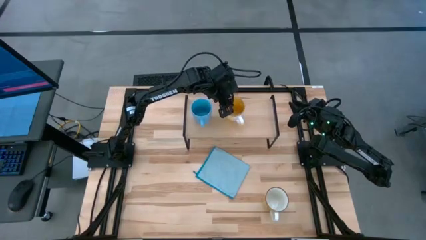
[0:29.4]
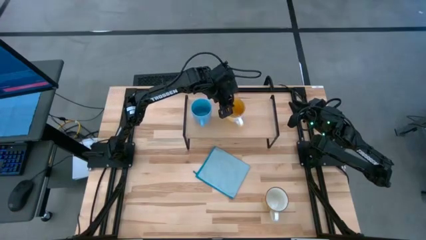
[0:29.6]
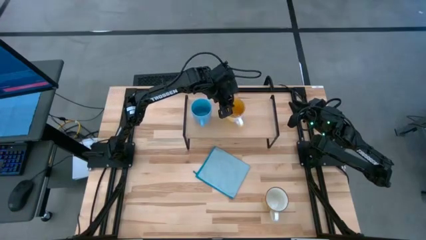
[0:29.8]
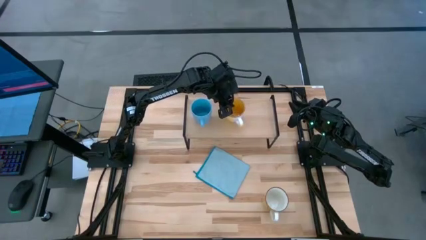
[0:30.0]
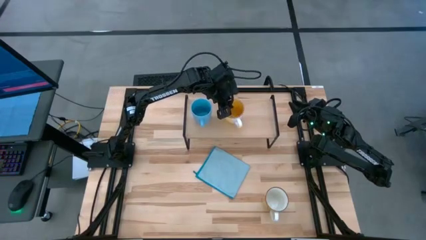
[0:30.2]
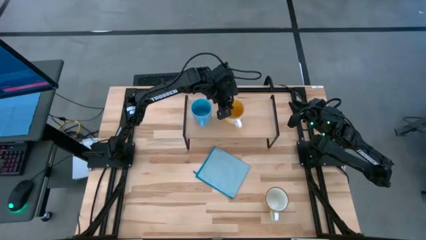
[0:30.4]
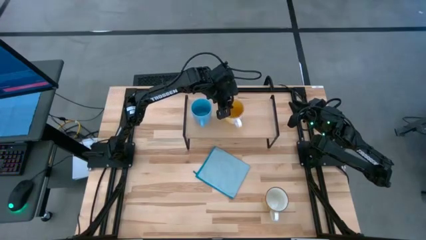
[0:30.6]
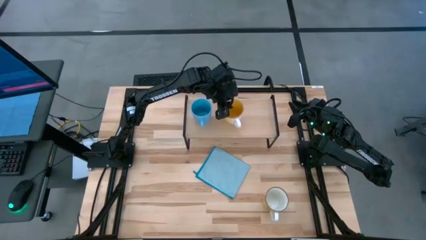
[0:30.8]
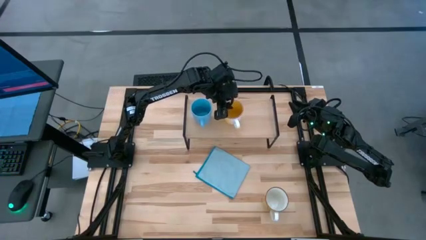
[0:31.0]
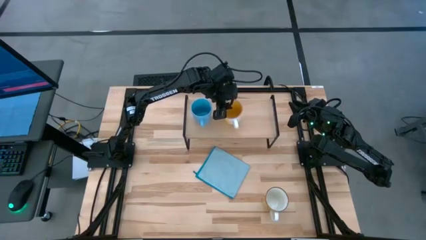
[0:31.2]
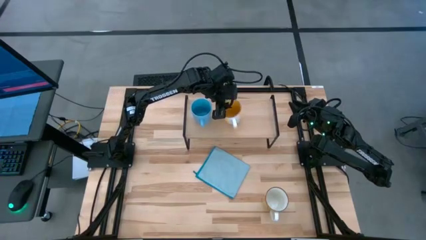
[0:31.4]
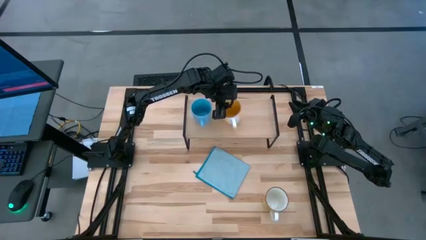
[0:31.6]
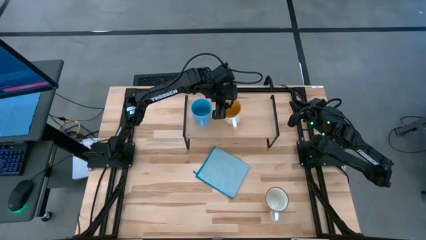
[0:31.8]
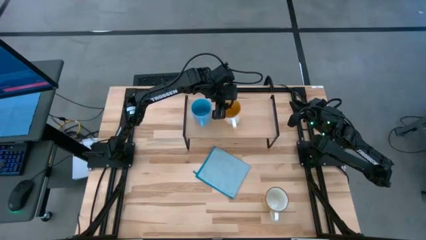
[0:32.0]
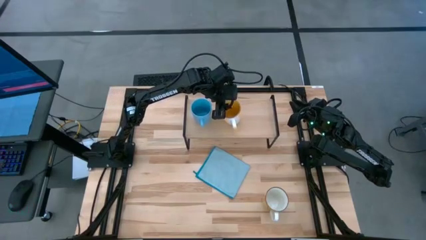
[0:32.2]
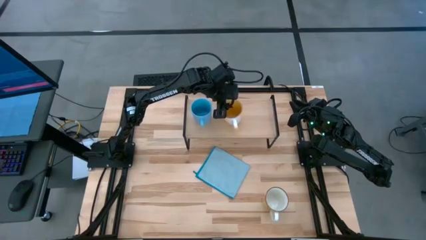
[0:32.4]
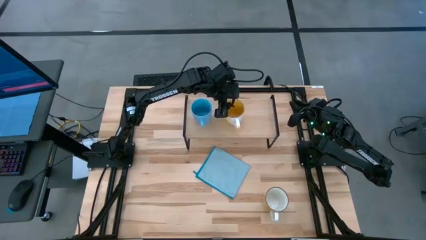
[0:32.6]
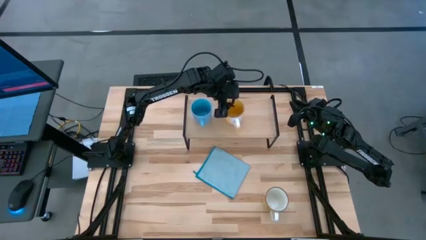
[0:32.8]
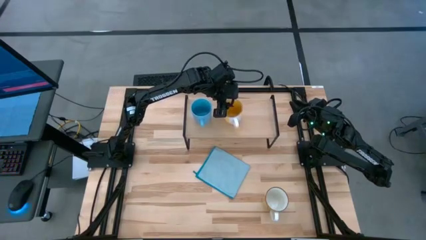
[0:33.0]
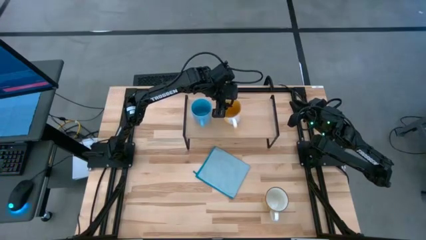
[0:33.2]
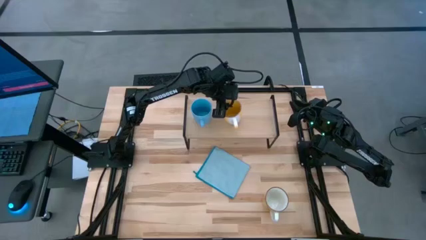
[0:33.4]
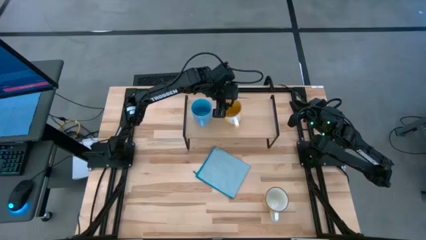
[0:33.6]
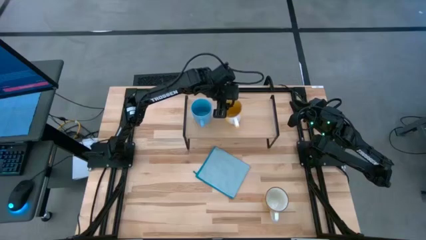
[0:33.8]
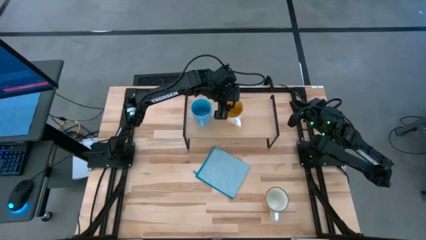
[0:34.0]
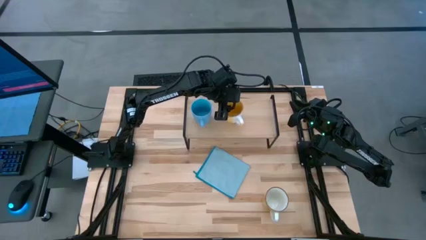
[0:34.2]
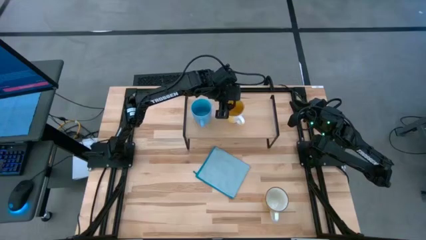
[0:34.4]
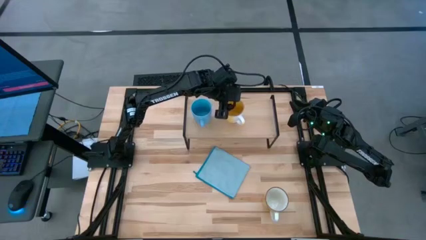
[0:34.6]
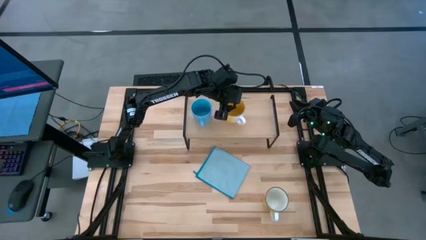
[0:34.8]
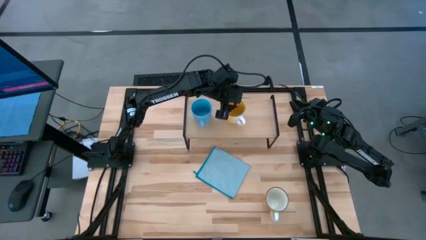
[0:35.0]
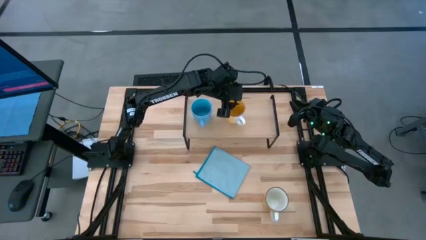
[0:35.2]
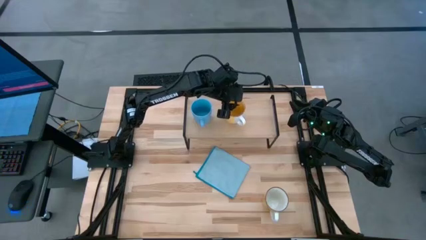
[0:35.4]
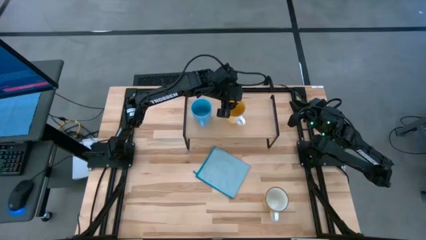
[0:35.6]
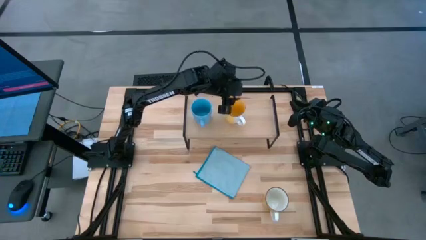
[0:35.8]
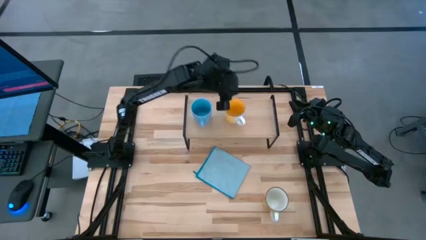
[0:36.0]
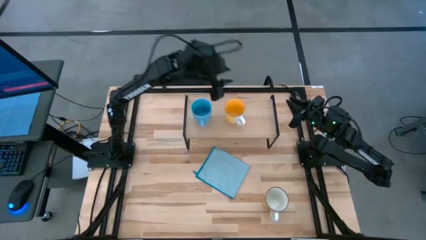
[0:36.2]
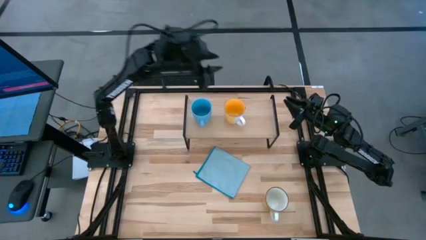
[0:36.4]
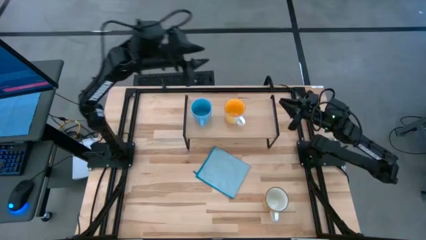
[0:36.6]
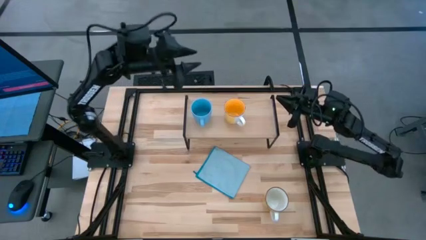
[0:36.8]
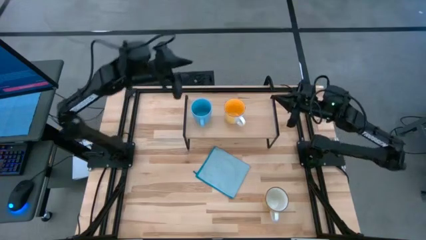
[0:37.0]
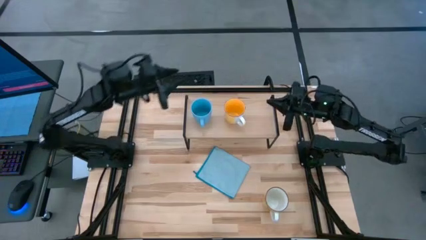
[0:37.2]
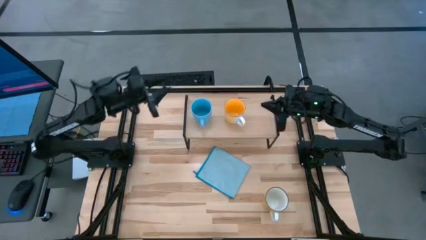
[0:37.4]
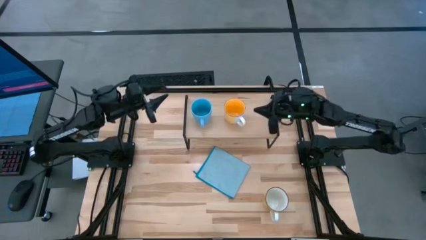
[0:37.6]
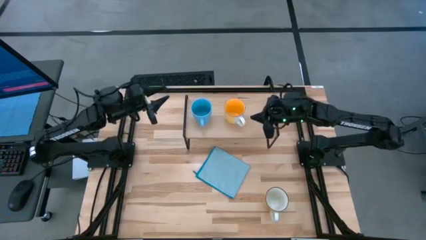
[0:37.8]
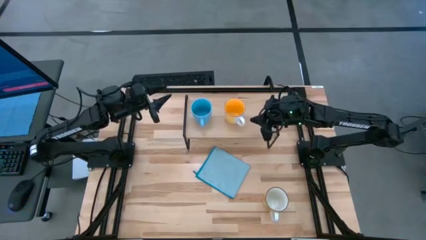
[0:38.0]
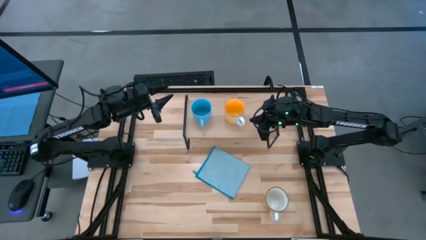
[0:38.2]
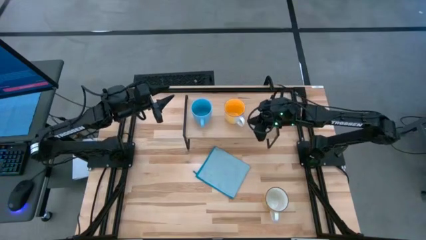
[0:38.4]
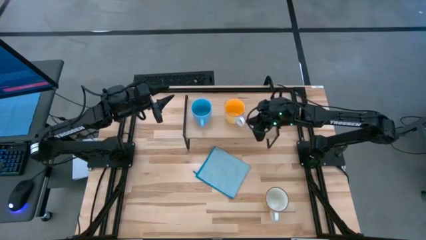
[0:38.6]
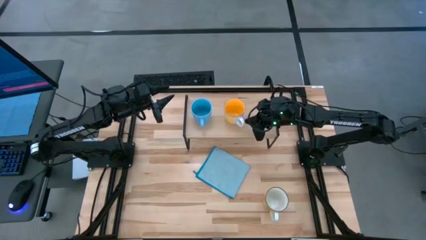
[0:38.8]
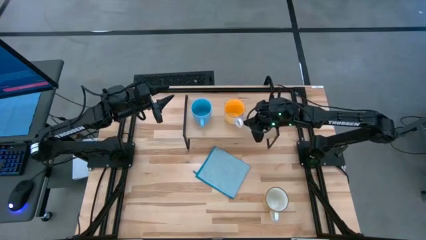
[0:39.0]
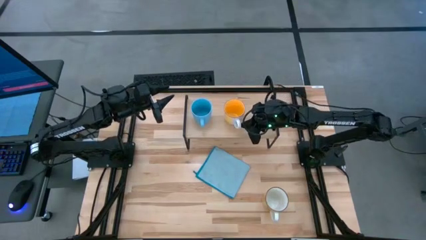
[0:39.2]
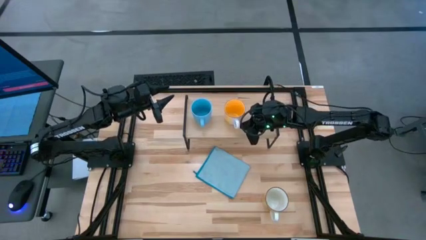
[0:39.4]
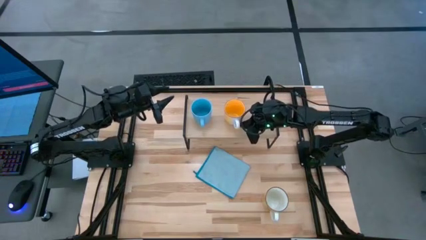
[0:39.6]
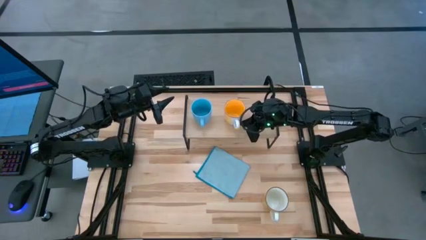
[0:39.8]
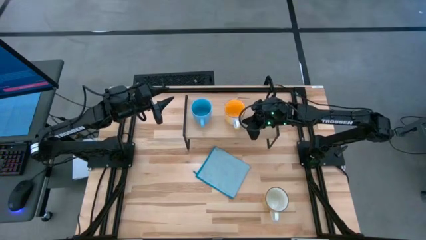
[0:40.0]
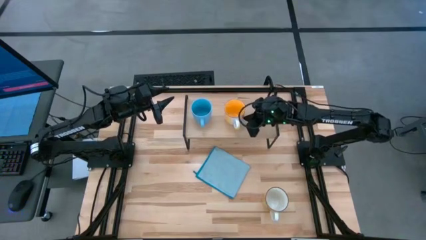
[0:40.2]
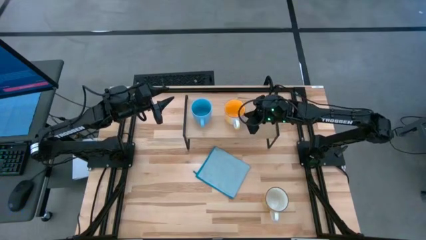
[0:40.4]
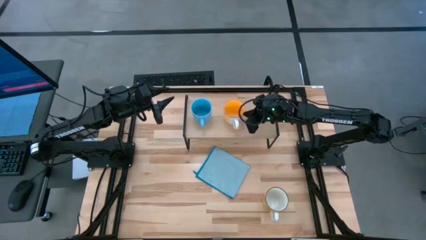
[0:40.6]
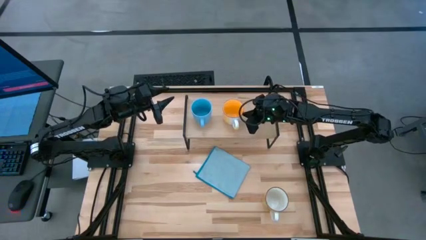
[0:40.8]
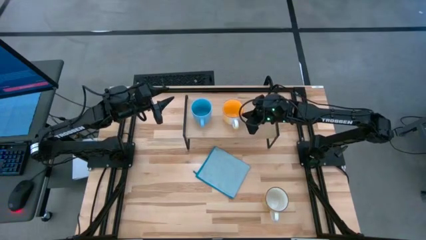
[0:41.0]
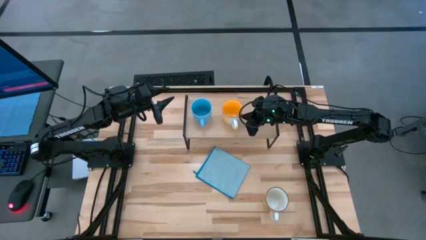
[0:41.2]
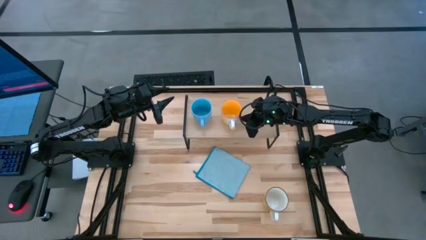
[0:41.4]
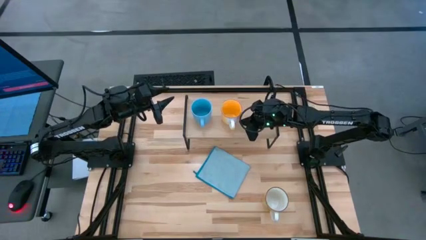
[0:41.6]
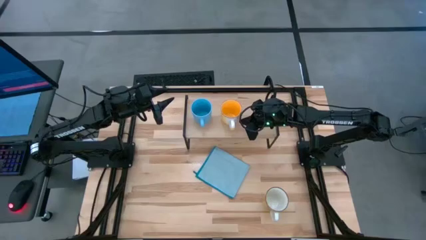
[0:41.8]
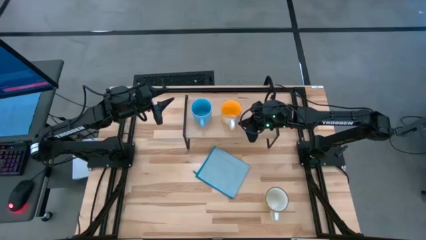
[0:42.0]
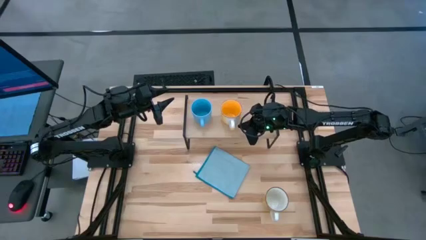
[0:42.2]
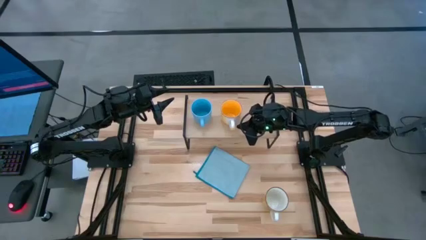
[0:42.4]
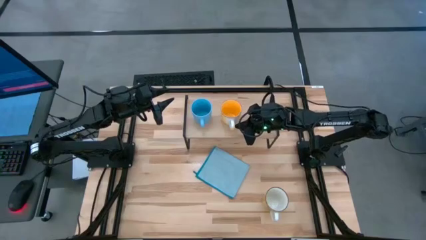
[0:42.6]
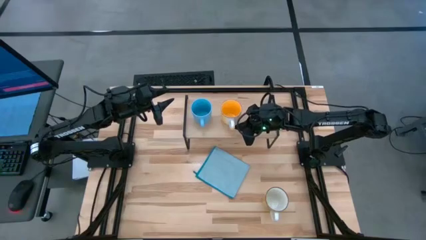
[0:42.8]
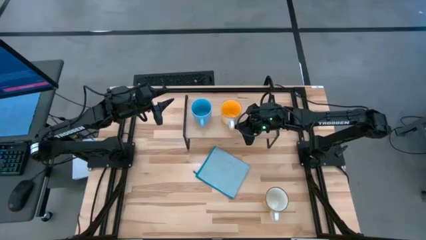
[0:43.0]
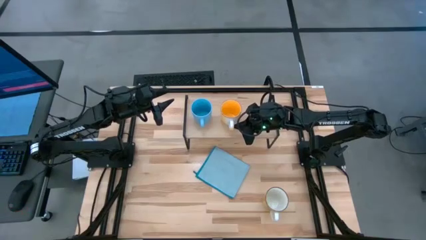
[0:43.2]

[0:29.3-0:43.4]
Task: Stack small to large cups/mugs on shelf
Put the yellow mug on the shelf

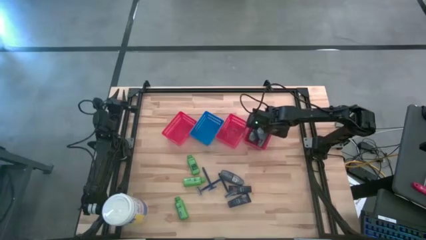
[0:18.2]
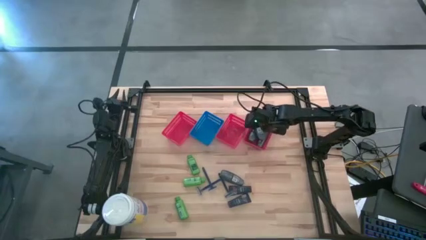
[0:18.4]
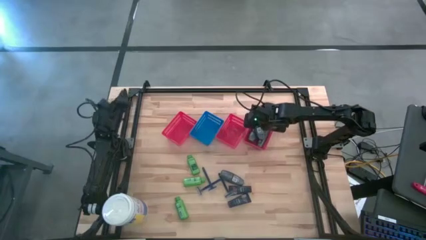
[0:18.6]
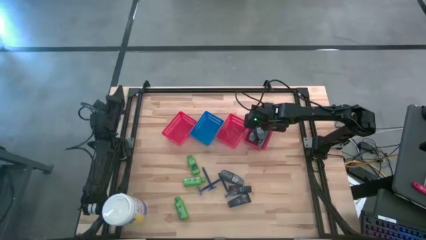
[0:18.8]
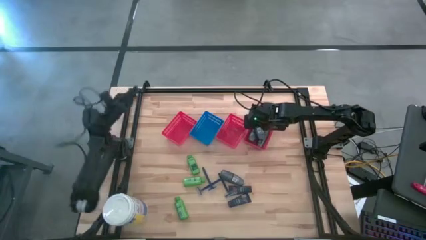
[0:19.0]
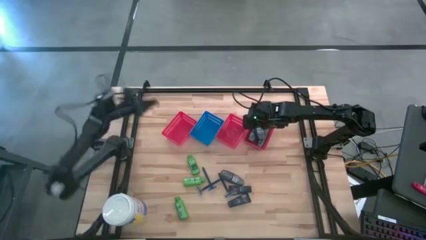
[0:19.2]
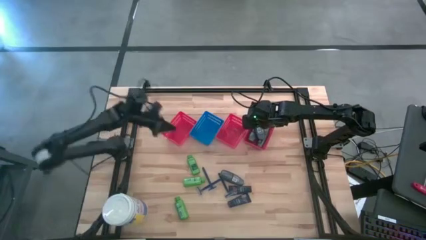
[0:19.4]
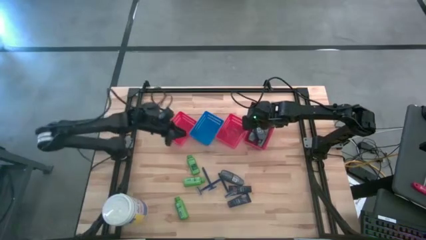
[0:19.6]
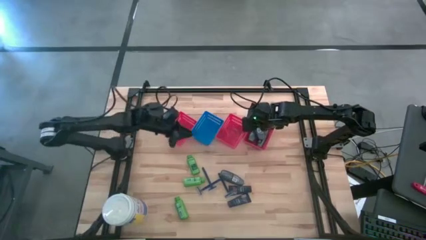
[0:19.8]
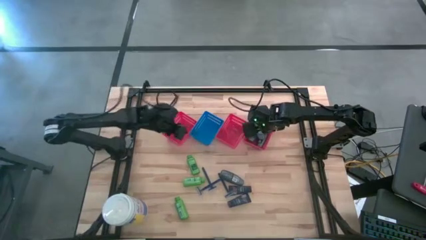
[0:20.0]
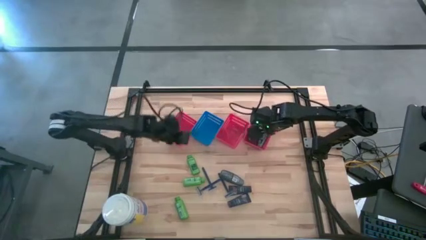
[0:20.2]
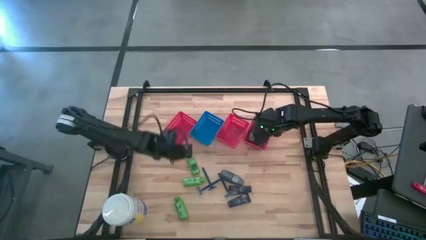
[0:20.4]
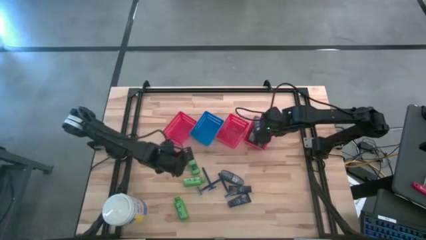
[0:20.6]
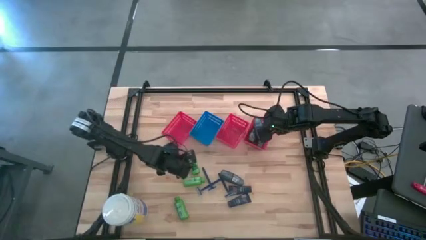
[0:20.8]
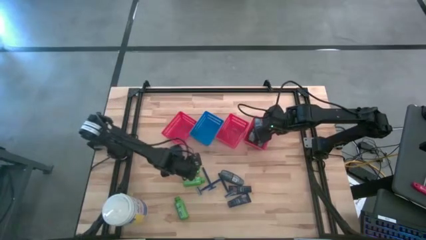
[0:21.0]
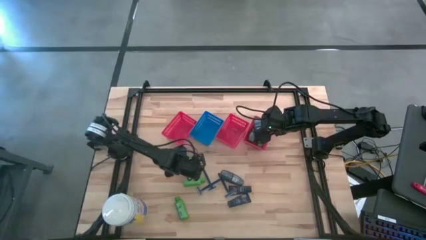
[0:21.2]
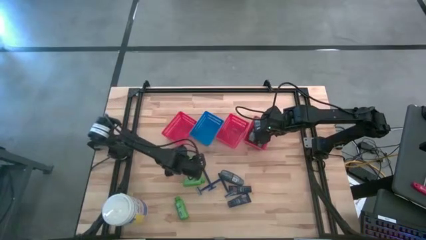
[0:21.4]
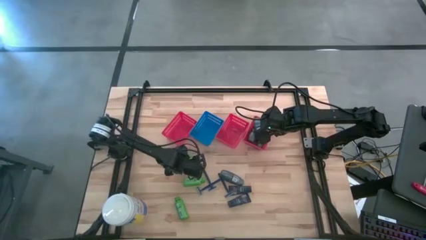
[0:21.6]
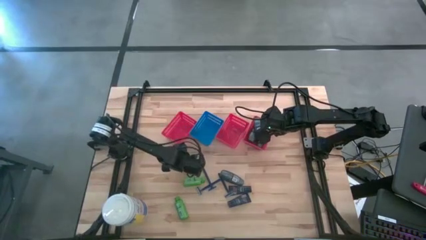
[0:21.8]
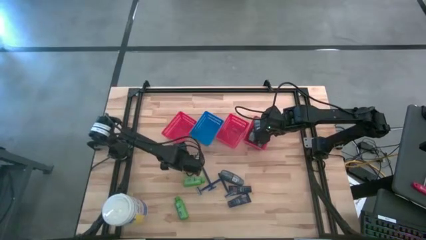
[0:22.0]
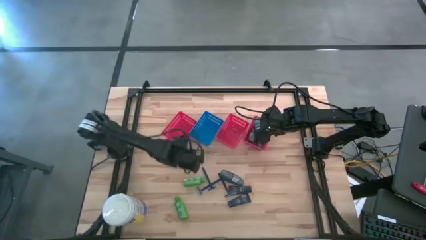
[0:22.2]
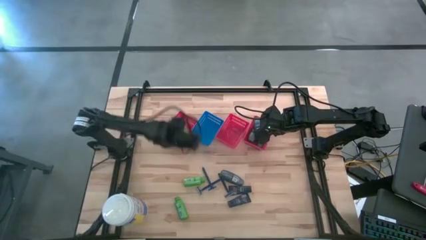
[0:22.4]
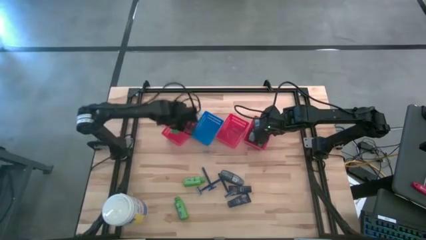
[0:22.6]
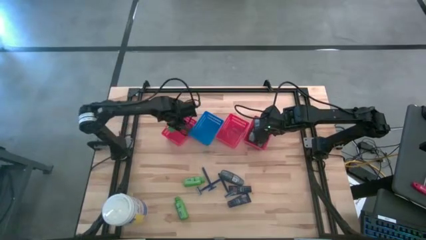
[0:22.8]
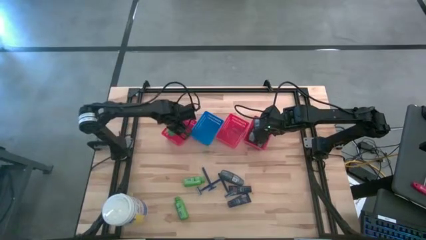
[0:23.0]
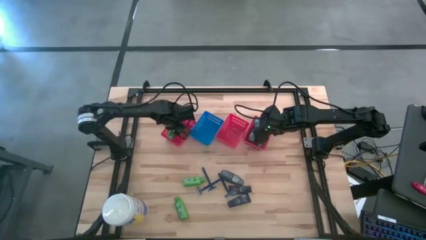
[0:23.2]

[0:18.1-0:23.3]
Task: Pick & Place Travel size toiletries
Put the green shampoo into the left red bin
